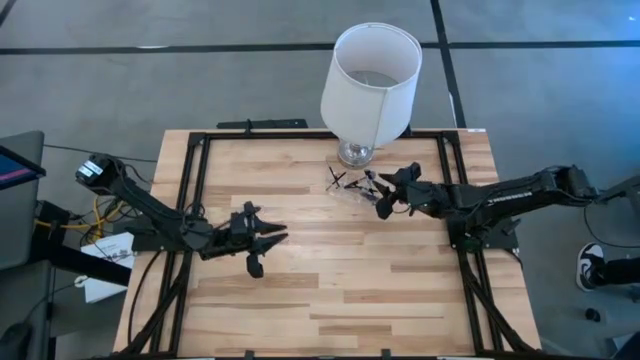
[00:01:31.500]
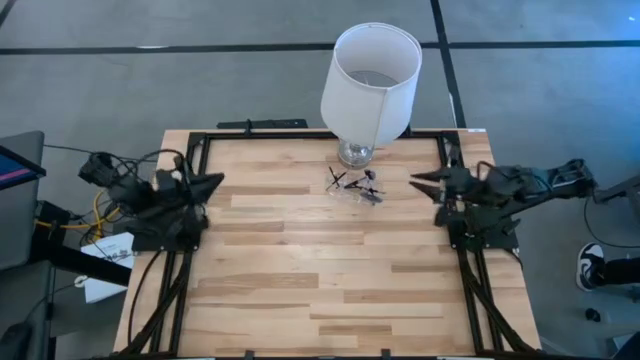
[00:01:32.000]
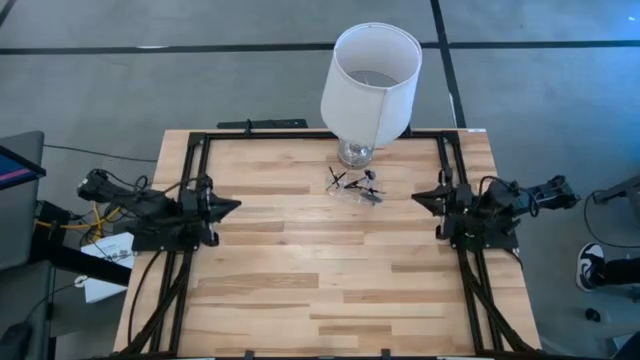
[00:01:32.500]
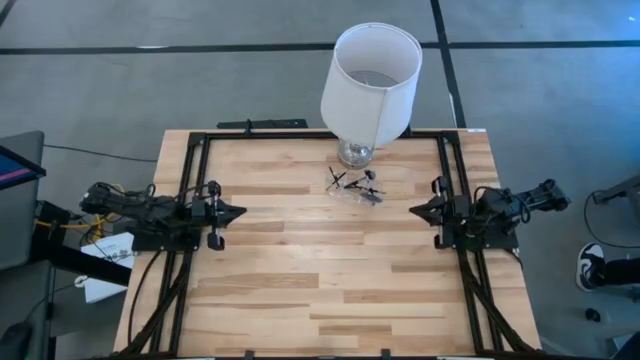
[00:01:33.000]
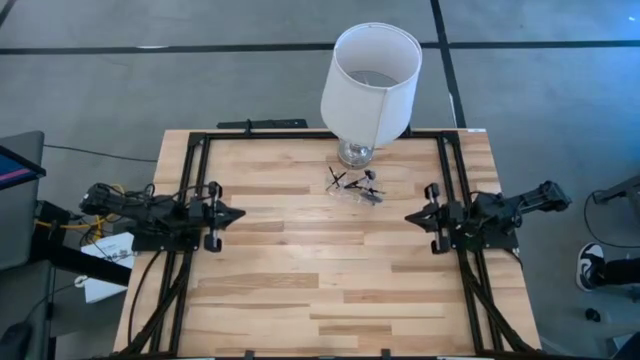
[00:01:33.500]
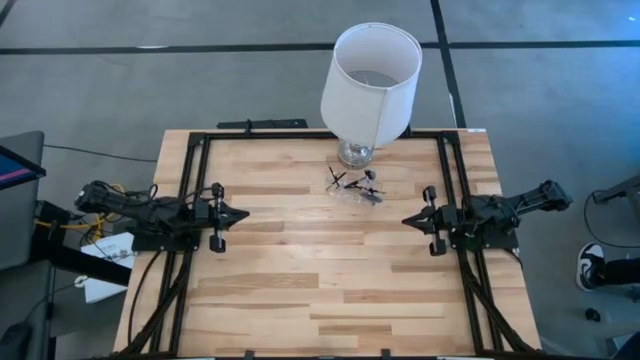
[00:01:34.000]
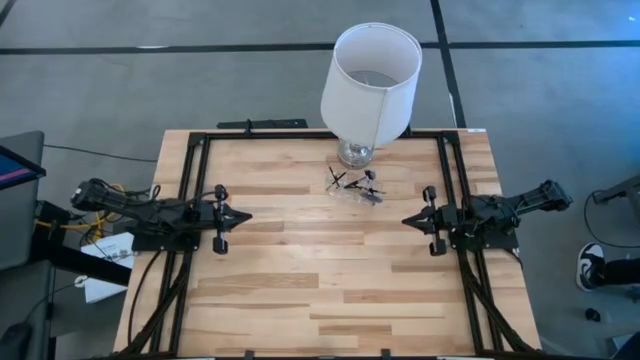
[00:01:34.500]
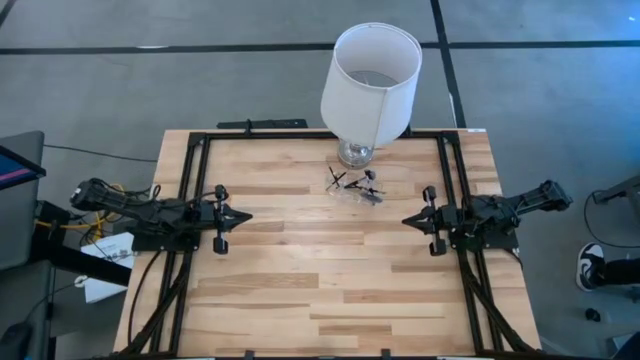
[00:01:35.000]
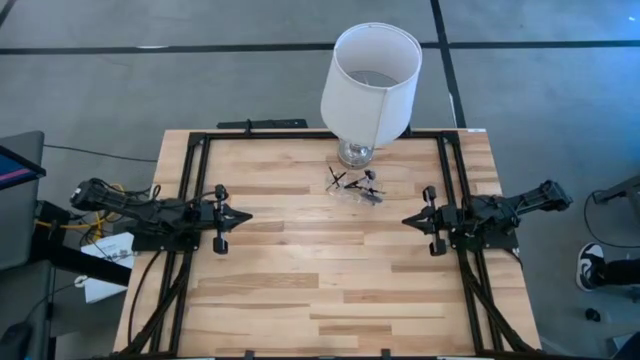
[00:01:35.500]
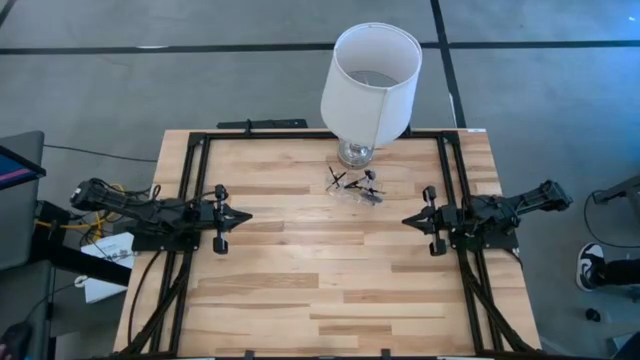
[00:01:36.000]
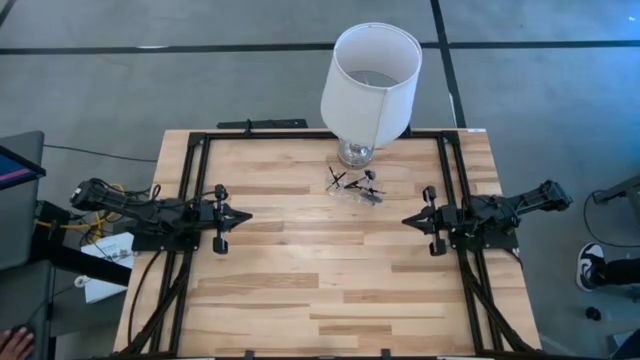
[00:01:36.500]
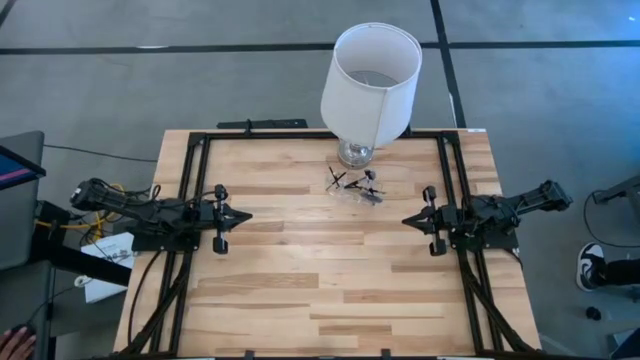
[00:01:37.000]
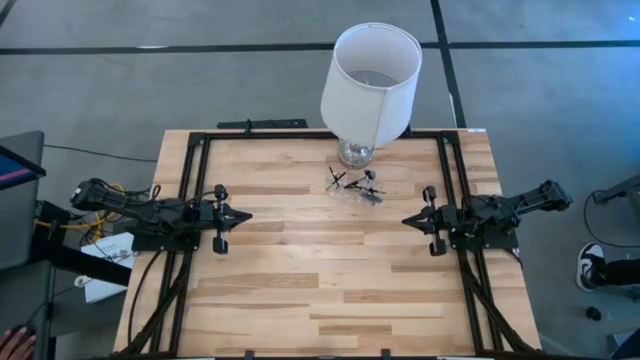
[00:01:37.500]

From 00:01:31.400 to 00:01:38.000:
Task: Put items in baskets/containers
Return to Home Position

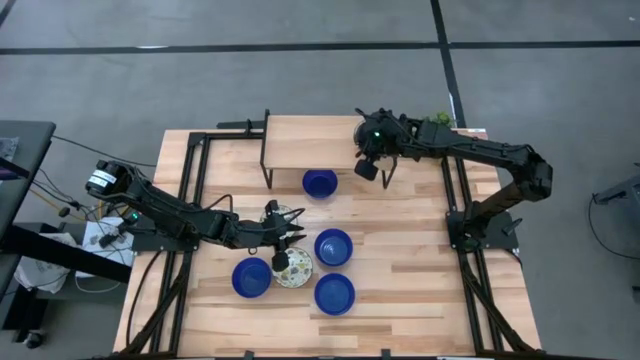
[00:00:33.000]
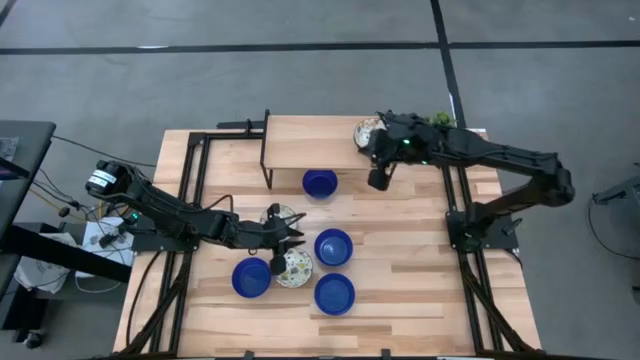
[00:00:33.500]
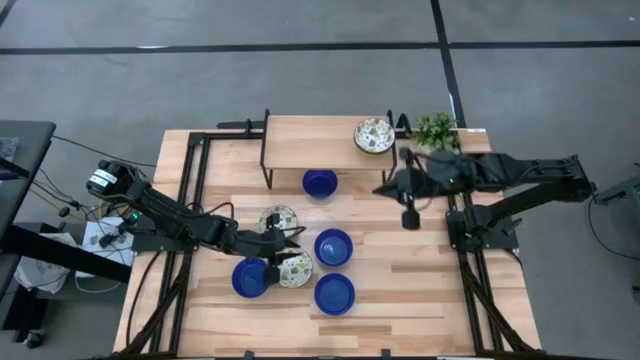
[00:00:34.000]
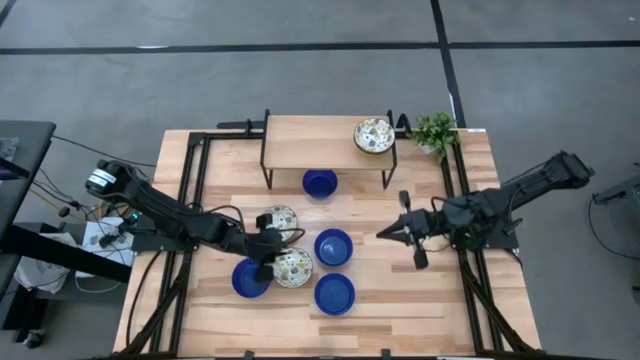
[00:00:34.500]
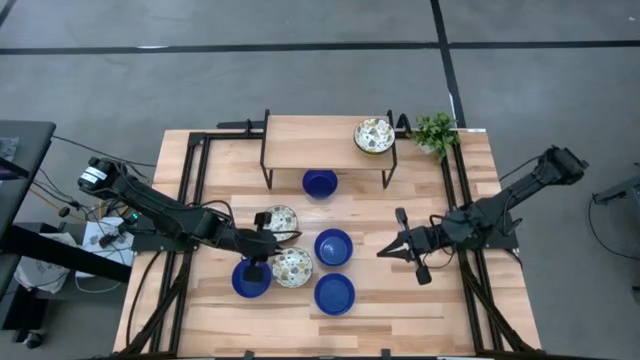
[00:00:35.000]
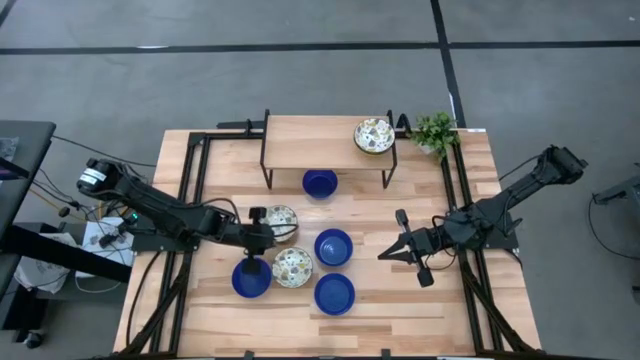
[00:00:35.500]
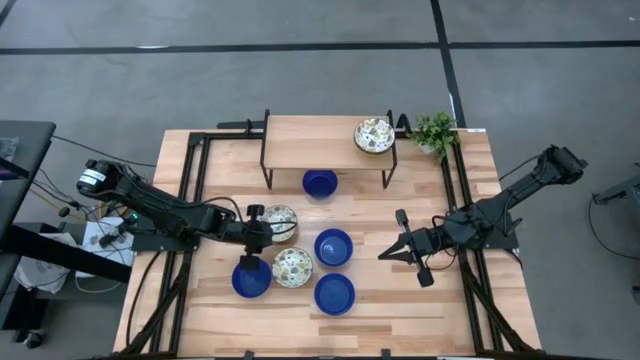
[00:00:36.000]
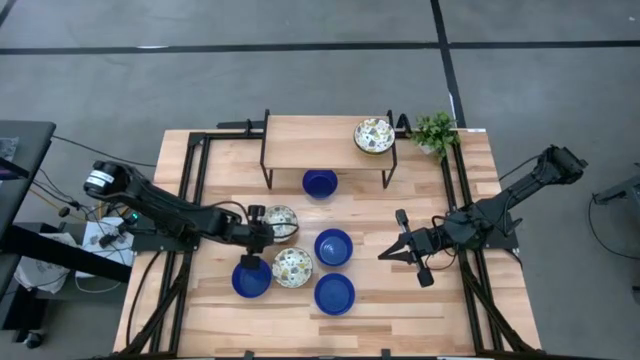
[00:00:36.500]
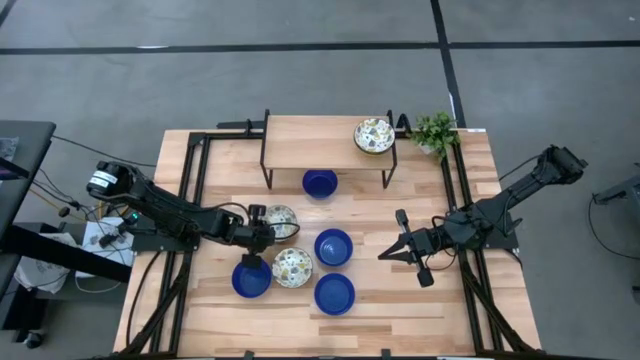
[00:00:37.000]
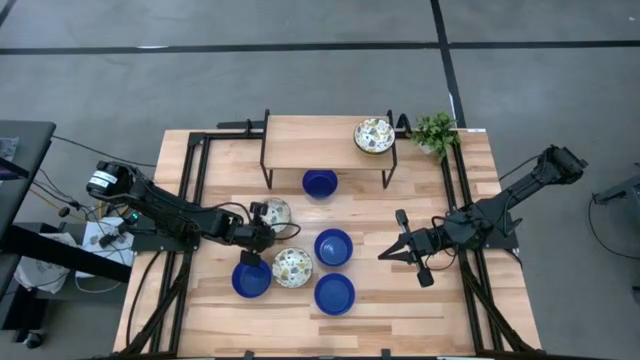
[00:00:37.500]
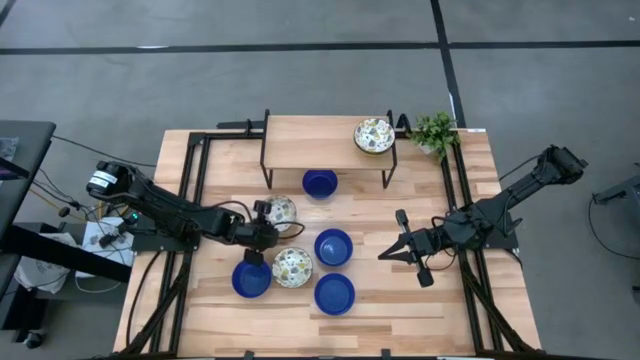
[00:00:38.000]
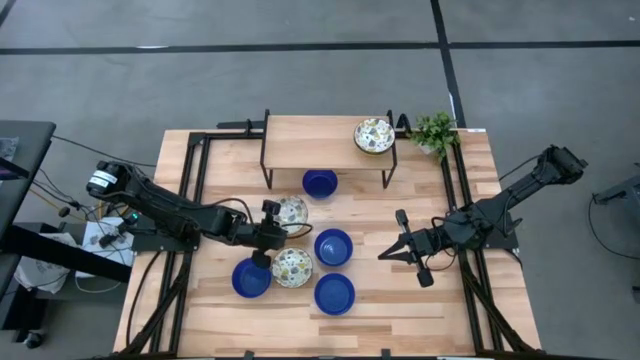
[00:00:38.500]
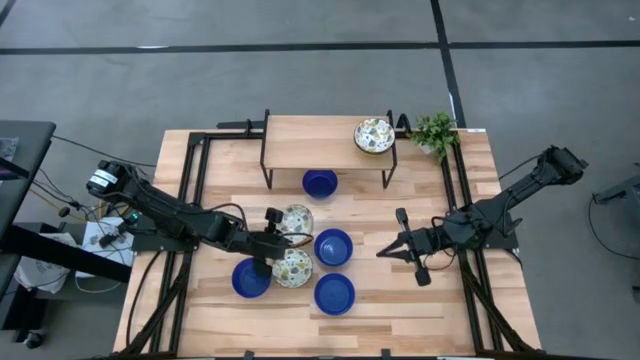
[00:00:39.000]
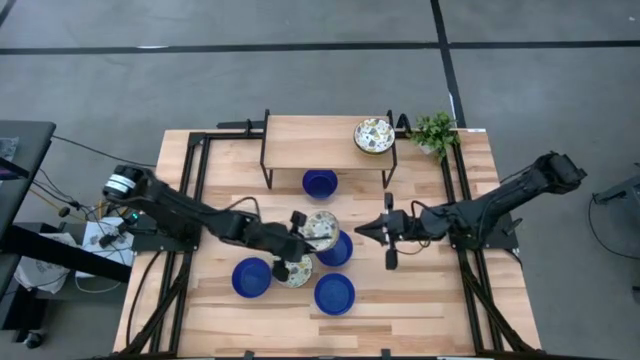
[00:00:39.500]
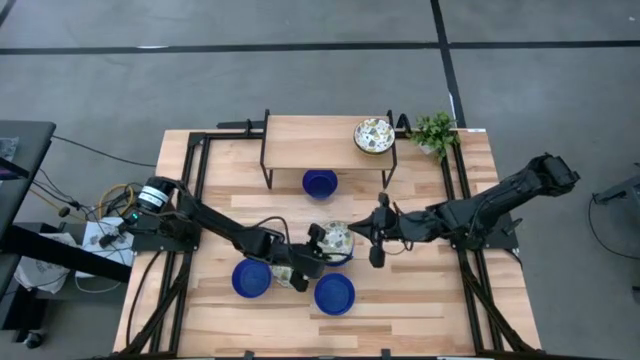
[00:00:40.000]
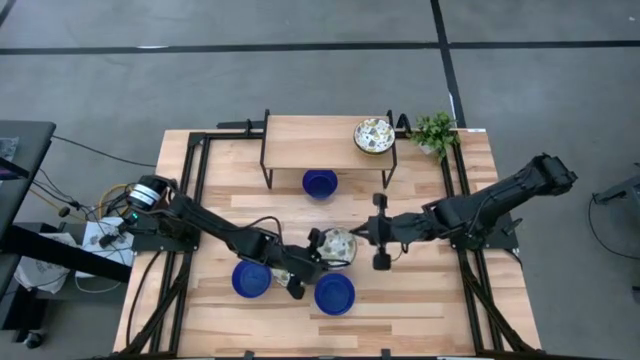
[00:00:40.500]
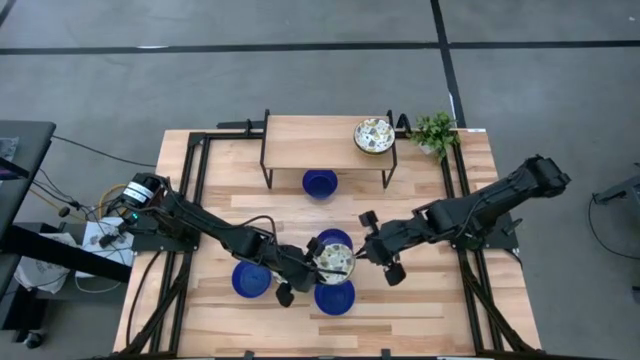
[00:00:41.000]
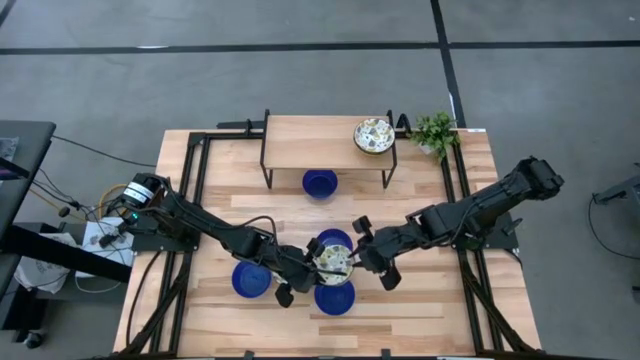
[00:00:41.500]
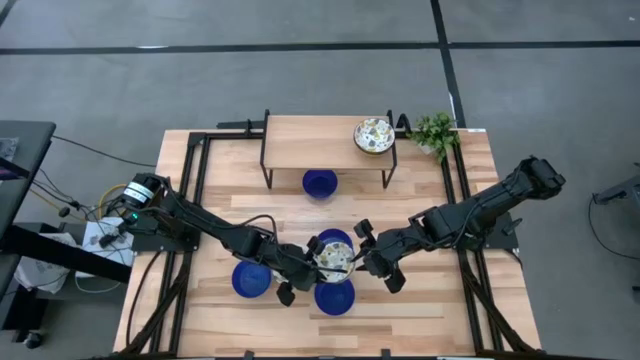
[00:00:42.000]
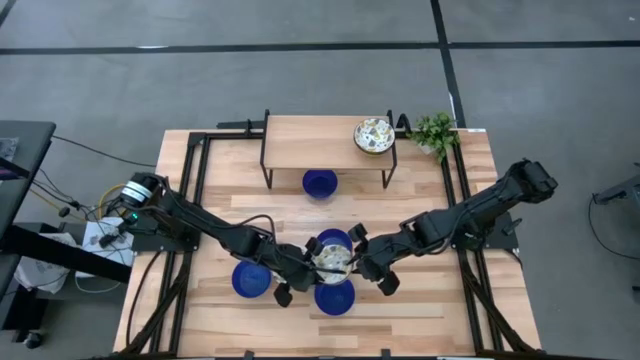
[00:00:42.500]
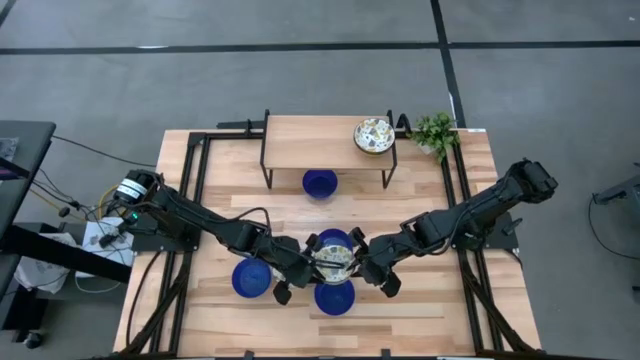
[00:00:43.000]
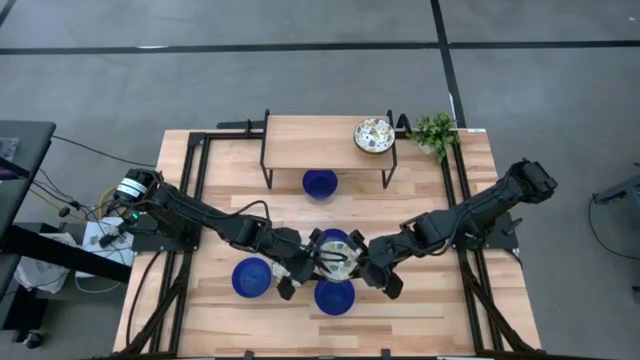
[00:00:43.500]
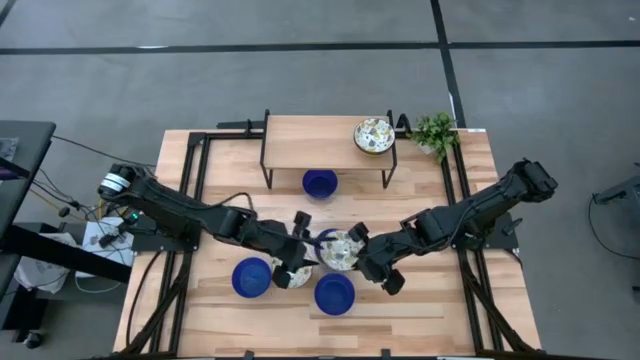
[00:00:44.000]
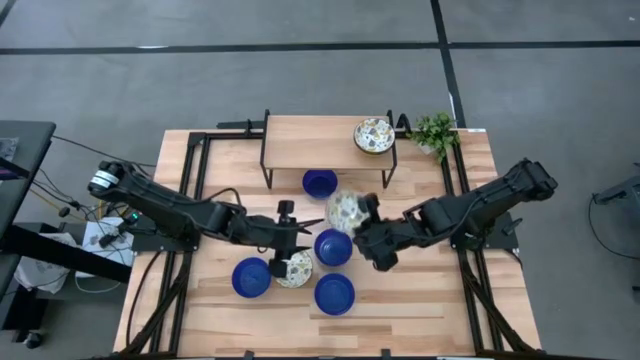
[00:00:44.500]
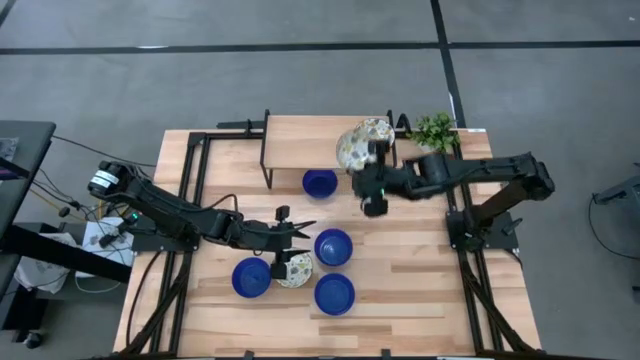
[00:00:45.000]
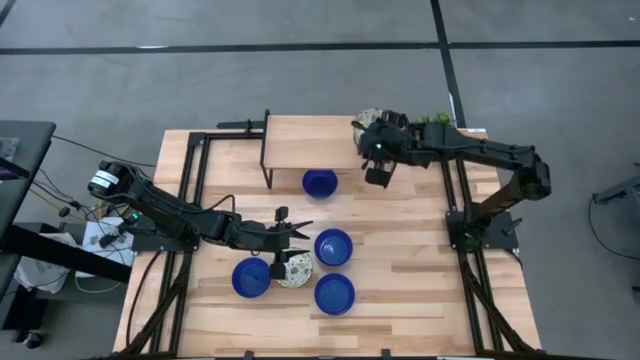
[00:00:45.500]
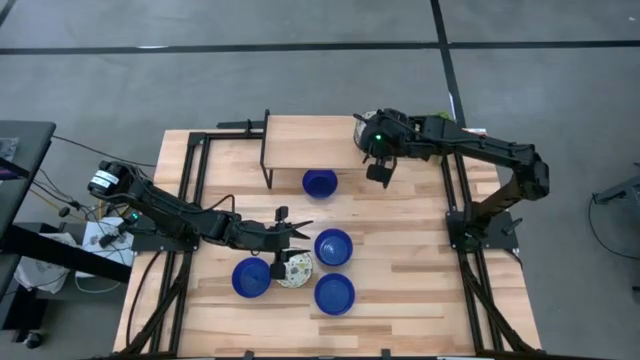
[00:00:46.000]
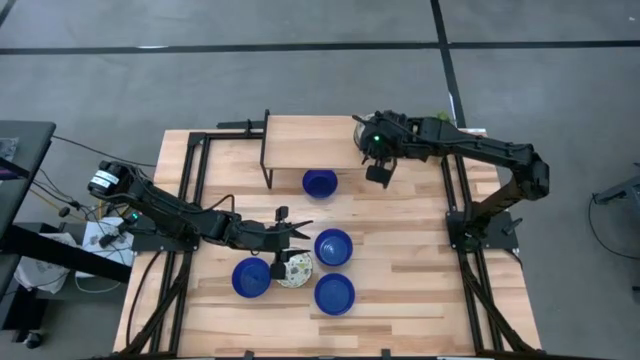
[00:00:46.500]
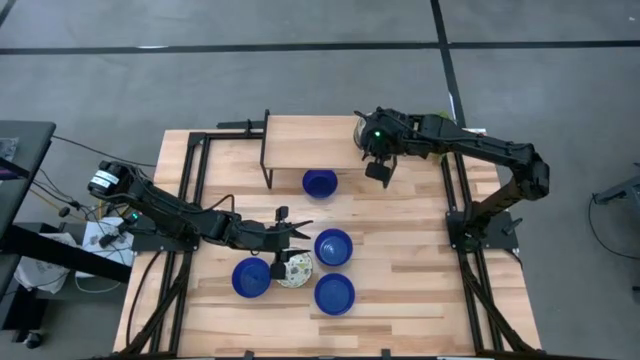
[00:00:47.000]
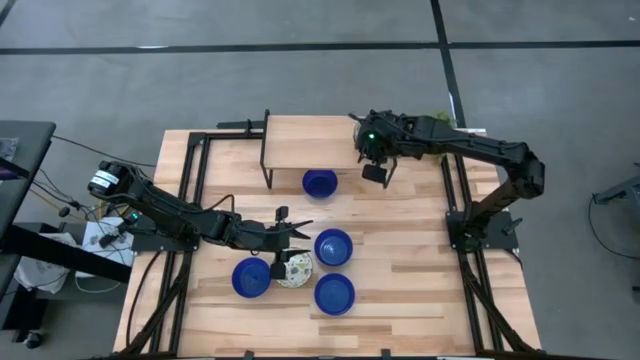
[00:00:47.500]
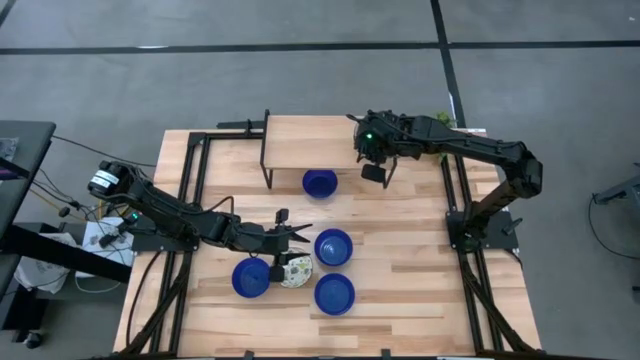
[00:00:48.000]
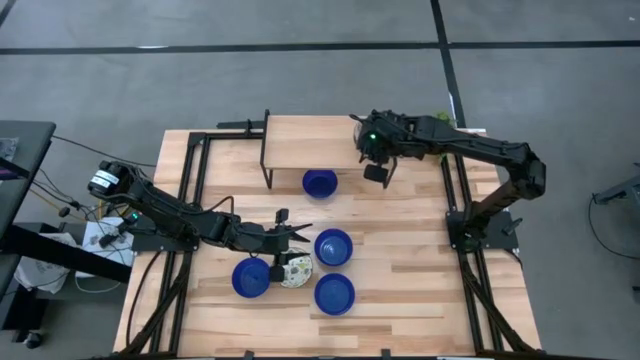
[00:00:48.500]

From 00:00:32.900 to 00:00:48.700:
Task: Pick & Place Mini bowls
Stack the white patterned bowl on the white patterned bowl on the shelf
